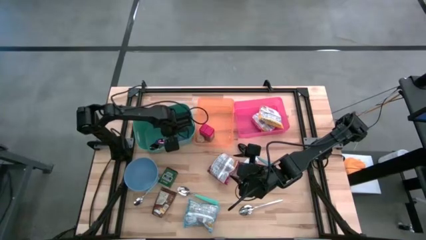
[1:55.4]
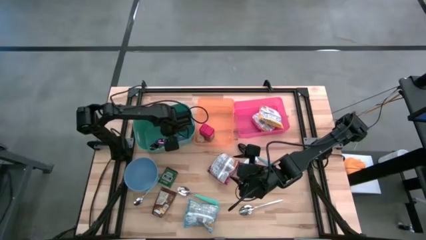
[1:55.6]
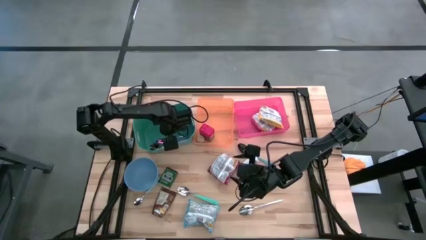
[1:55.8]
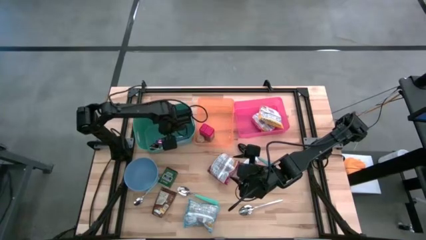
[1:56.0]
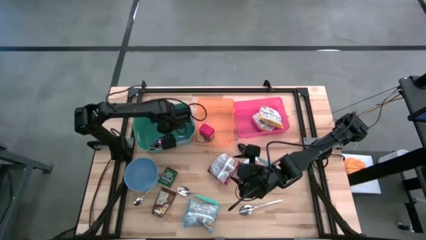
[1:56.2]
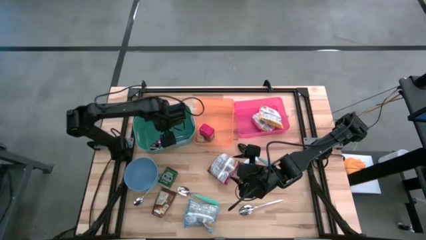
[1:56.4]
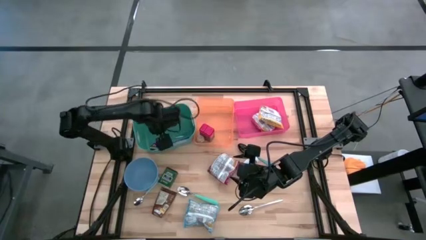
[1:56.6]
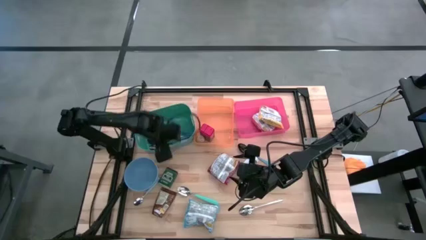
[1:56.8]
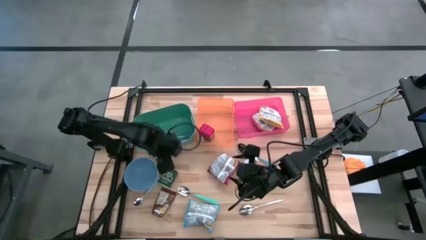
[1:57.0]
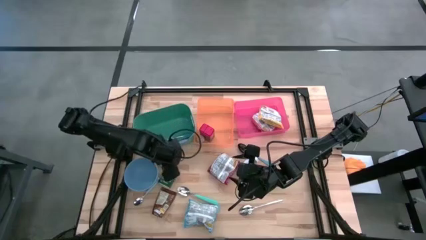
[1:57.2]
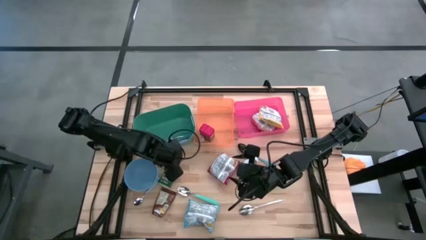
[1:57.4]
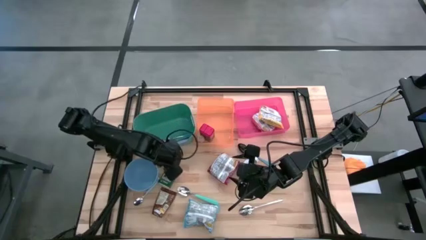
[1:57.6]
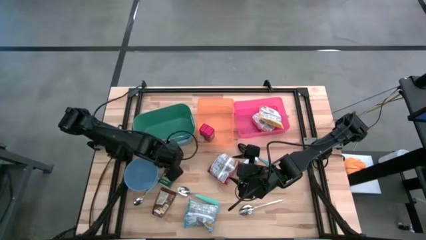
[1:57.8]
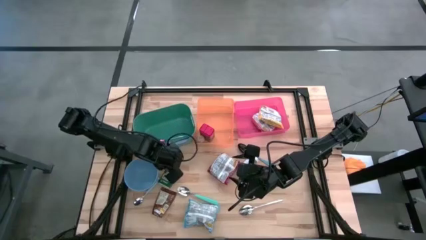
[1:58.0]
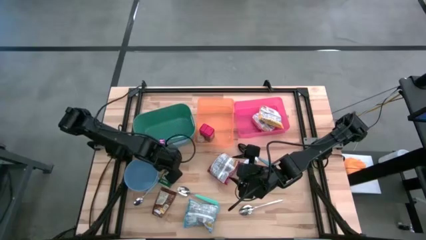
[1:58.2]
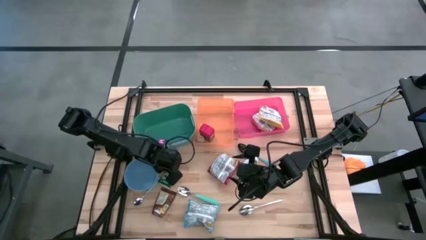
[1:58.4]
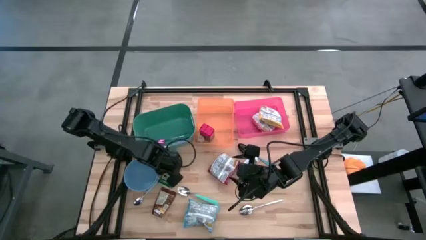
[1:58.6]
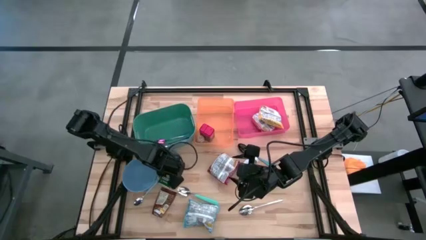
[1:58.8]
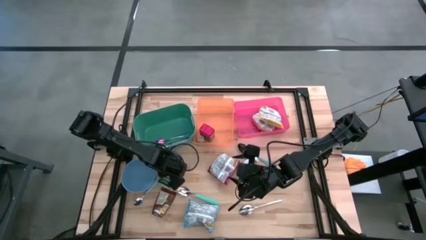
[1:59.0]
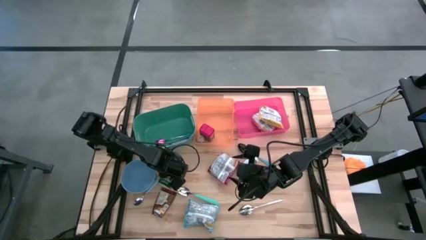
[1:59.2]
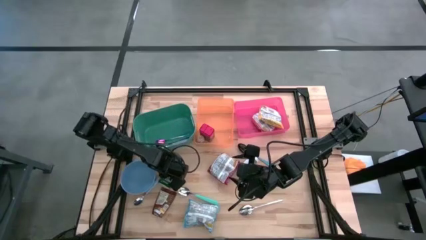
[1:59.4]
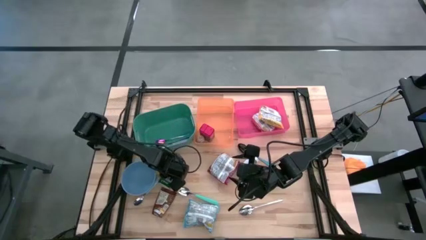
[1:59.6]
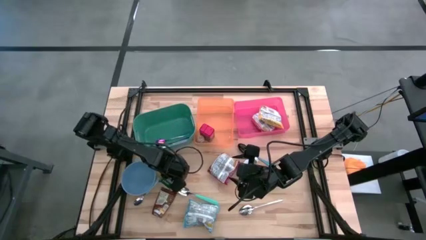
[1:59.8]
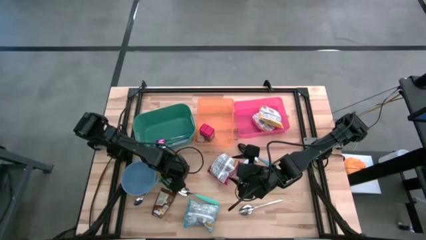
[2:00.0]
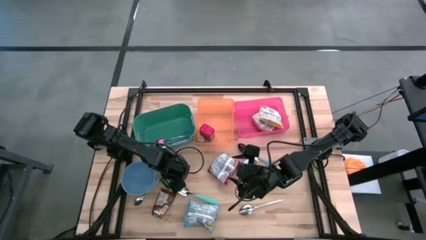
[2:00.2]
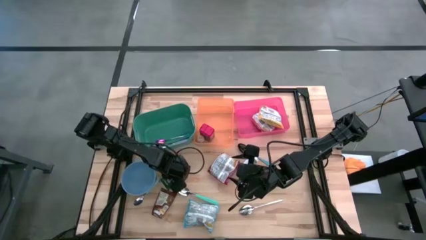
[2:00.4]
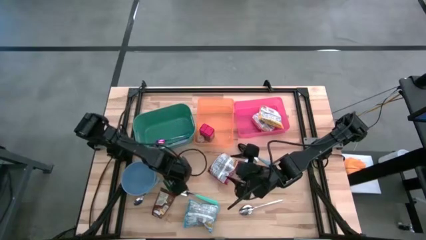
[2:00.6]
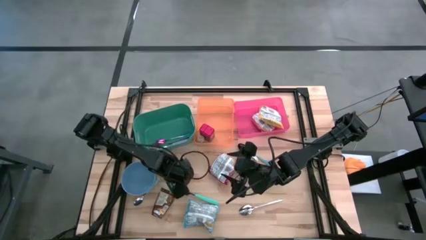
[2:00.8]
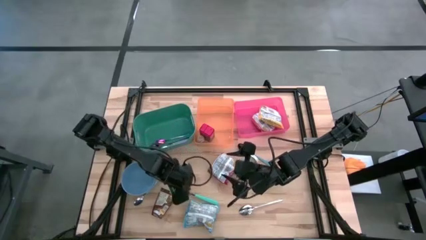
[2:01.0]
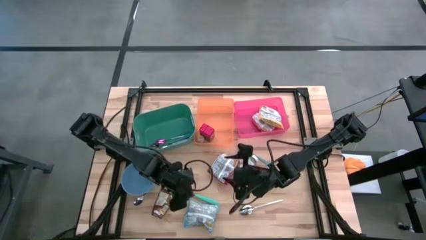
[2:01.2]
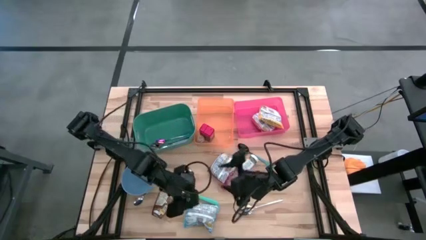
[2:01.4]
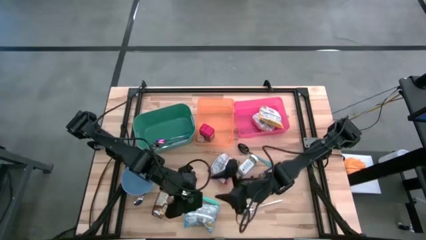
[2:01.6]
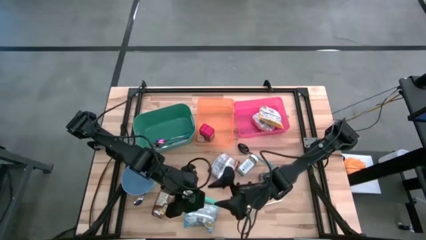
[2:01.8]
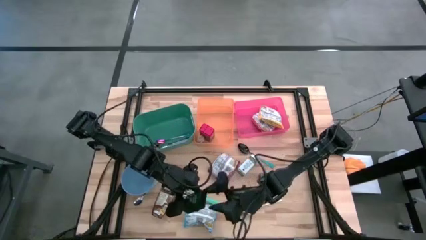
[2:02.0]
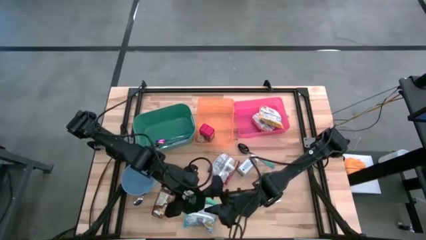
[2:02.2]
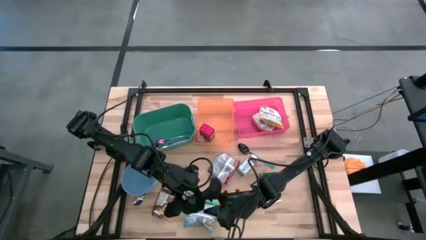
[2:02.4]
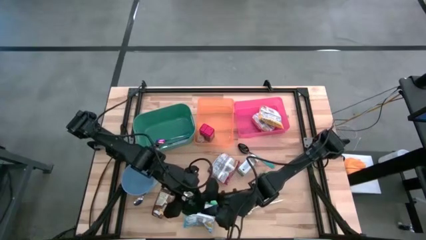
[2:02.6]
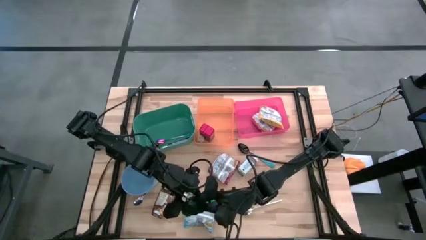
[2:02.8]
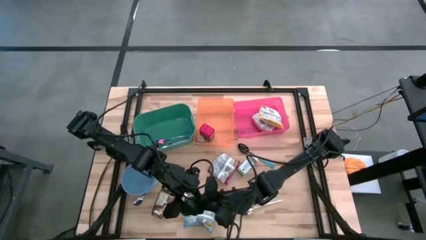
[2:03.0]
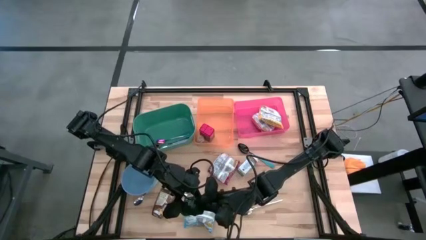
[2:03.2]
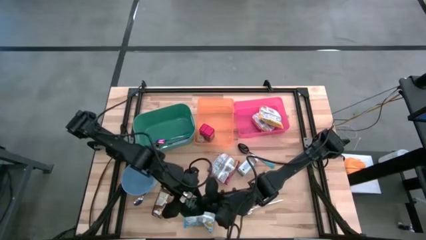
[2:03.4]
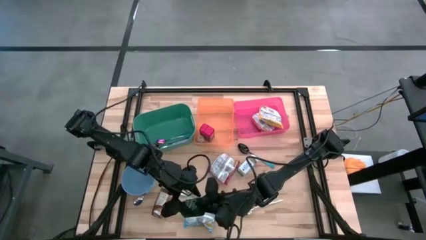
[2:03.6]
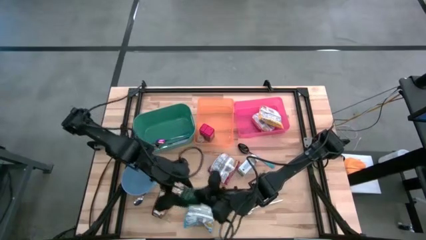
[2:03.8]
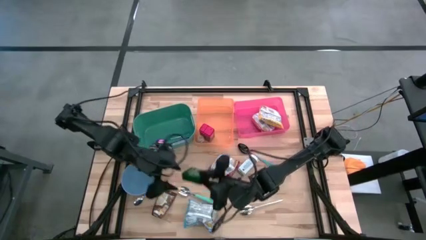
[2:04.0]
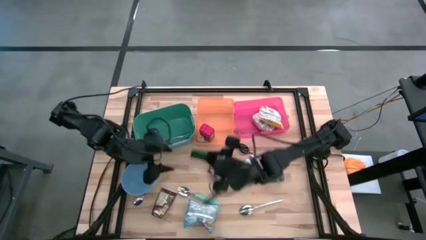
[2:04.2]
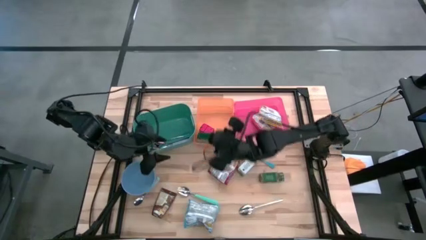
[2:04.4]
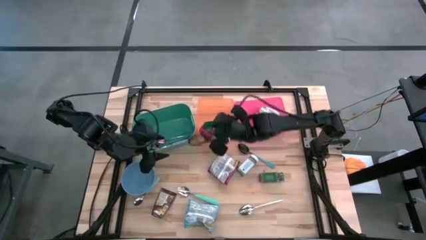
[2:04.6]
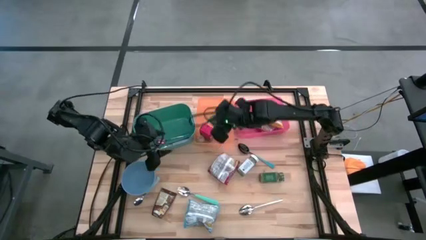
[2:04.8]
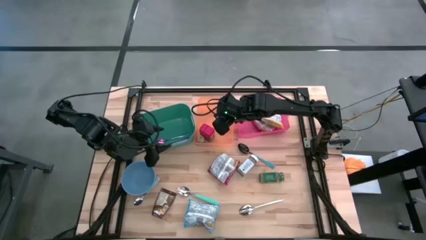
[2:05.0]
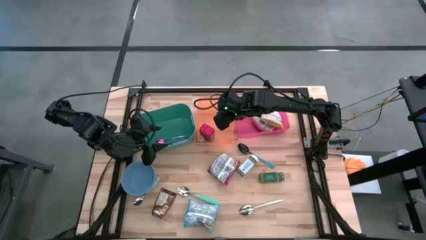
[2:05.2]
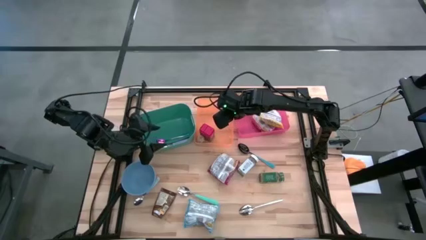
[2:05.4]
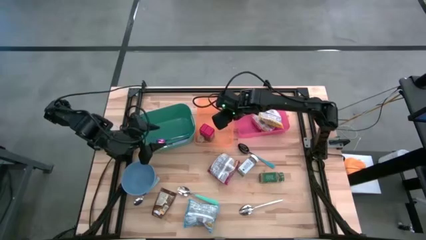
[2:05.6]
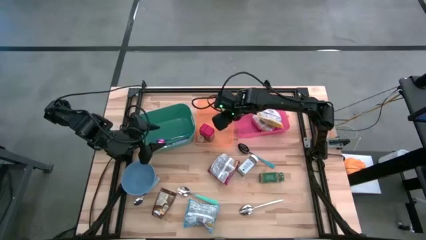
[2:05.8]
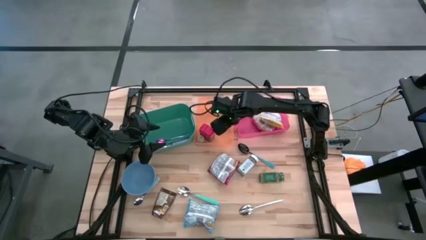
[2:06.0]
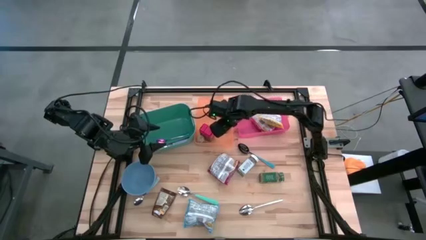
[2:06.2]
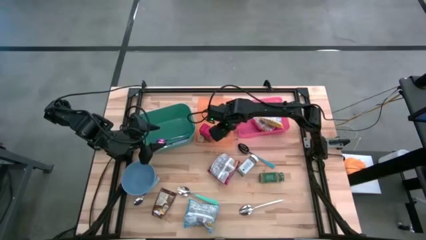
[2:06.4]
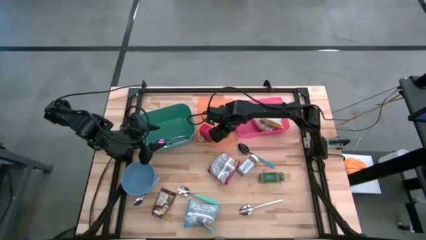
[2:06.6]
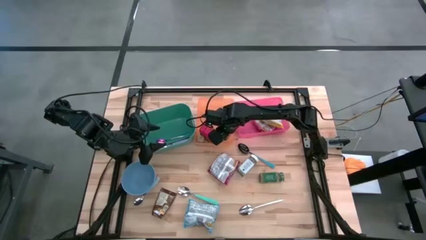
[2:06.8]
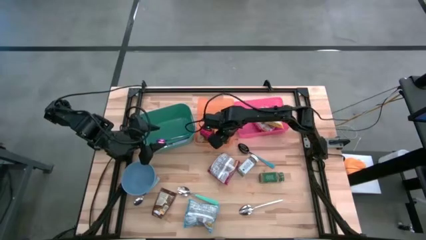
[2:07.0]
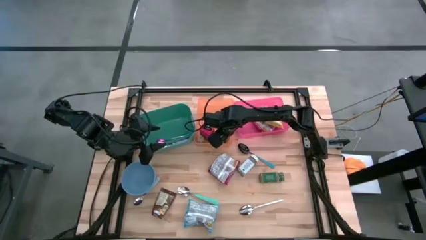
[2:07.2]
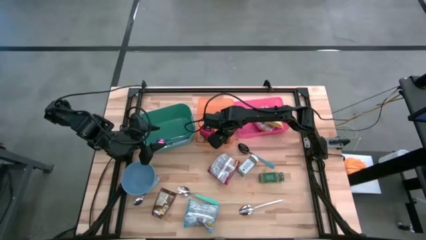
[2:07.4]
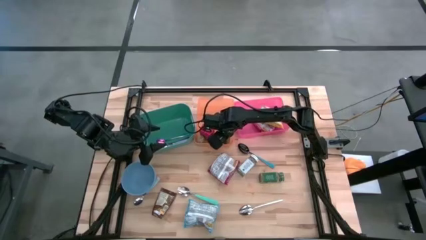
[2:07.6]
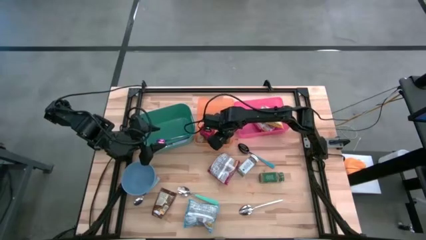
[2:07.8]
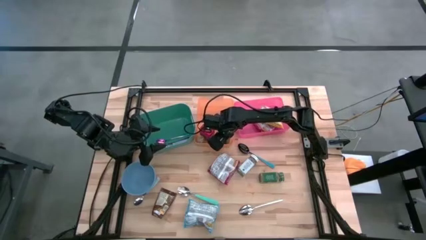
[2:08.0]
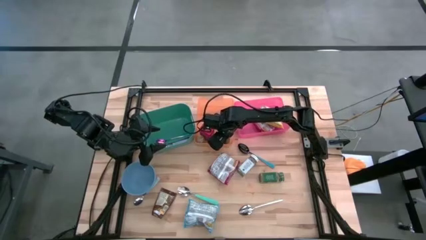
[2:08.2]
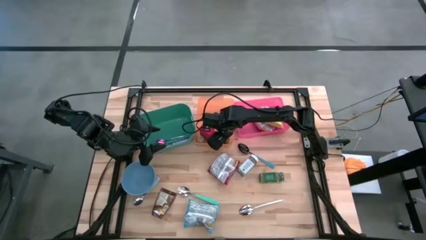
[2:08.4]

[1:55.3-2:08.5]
Put the green seasoning can into the orange bin

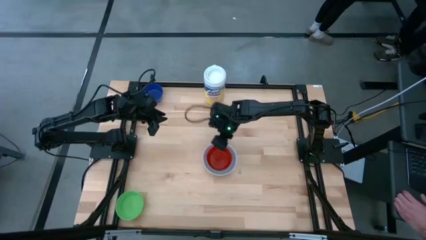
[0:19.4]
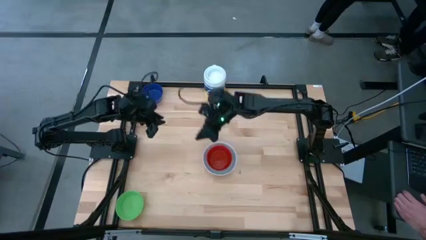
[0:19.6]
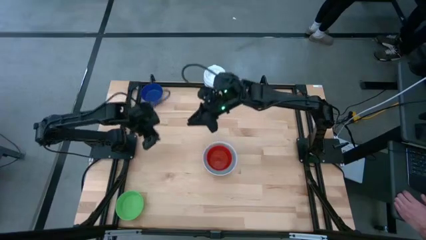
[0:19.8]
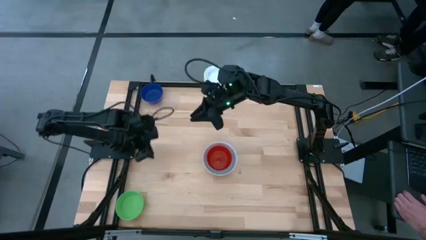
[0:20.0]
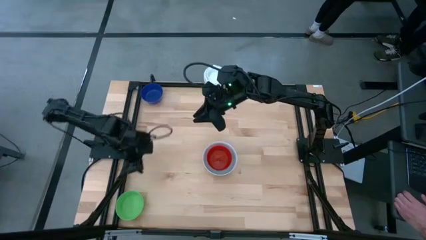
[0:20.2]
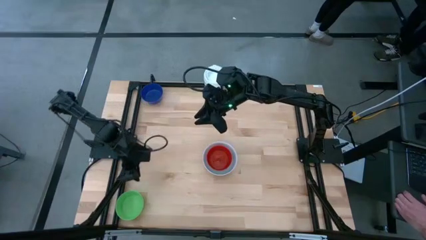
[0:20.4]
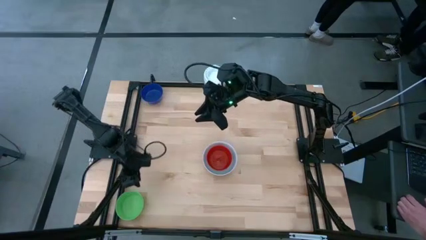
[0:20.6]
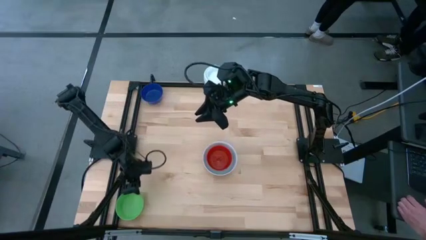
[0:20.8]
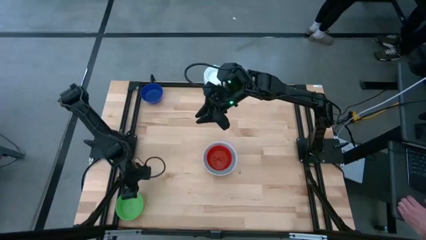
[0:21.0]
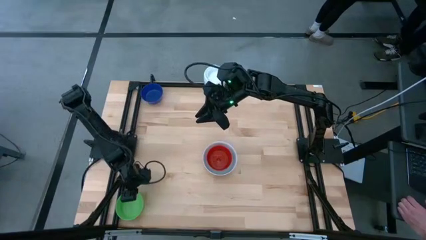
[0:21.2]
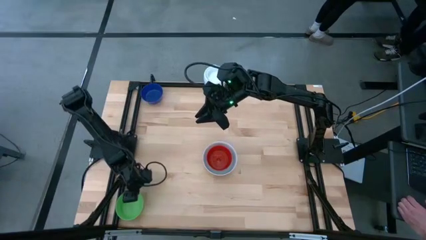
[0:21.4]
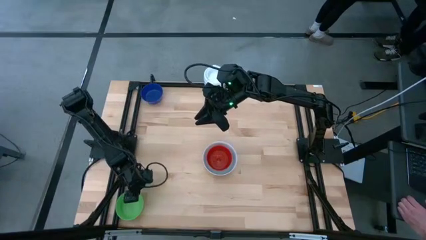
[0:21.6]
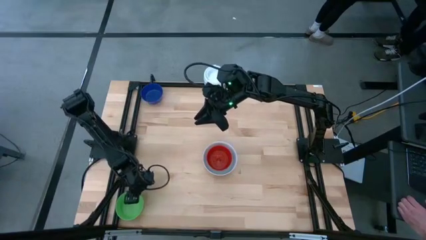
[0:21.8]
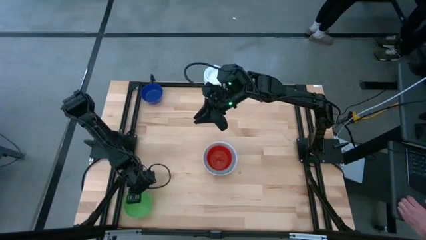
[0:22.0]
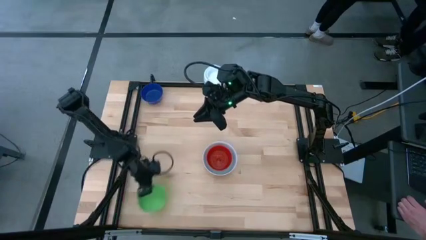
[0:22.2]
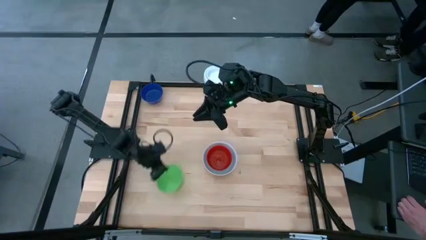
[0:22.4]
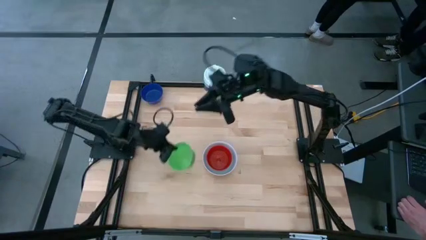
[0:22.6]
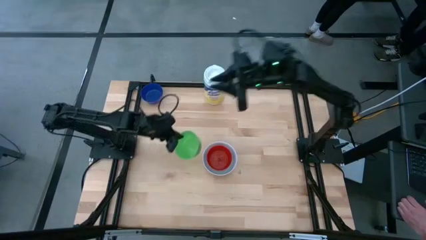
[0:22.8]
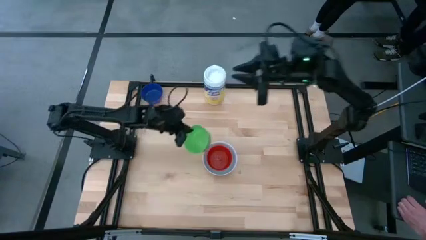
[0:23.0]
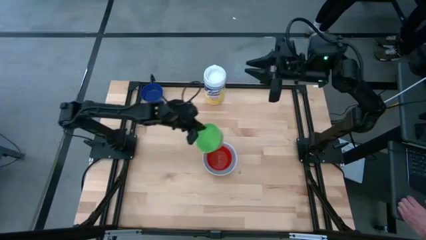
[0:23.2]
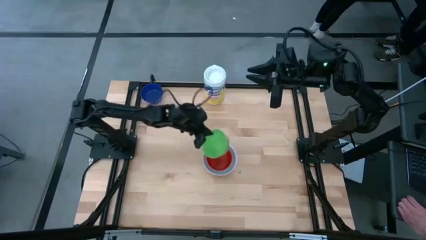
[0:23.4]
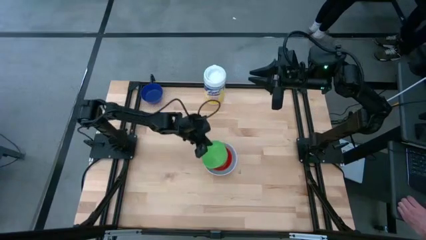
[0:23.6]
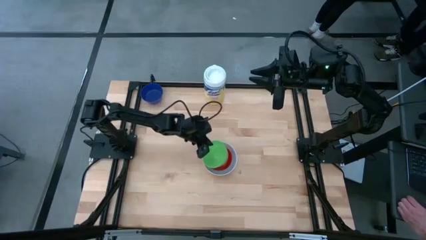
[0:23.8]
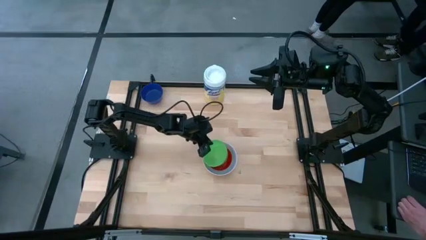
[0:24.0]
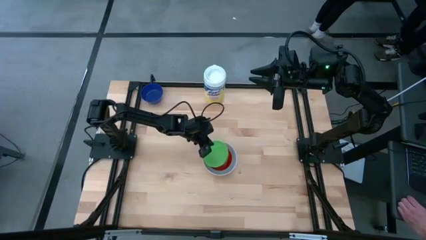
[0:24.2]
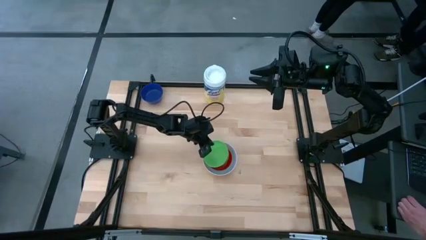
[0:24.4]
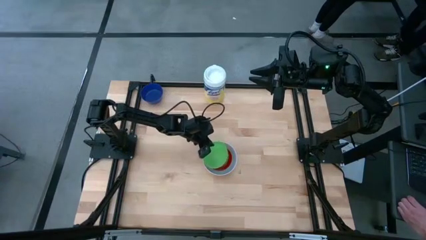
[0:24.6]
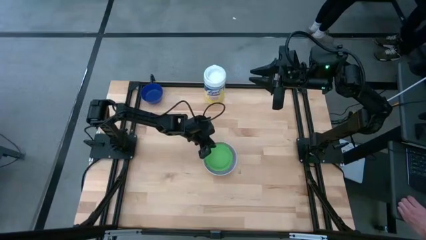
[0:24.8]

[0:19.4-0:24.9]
Stack the green bowl on top of the red bowl
